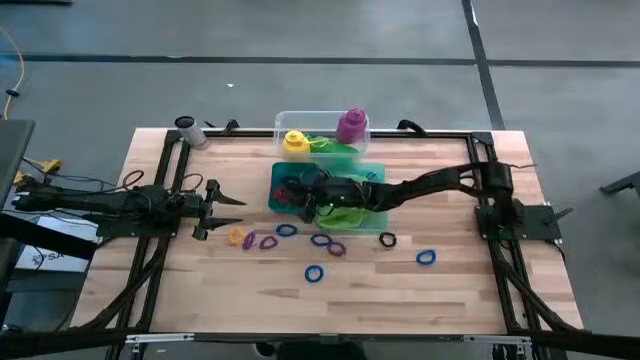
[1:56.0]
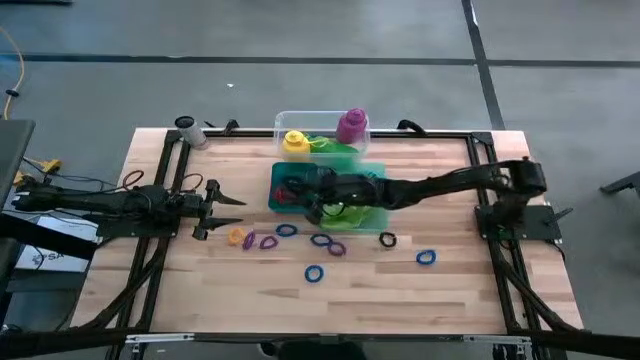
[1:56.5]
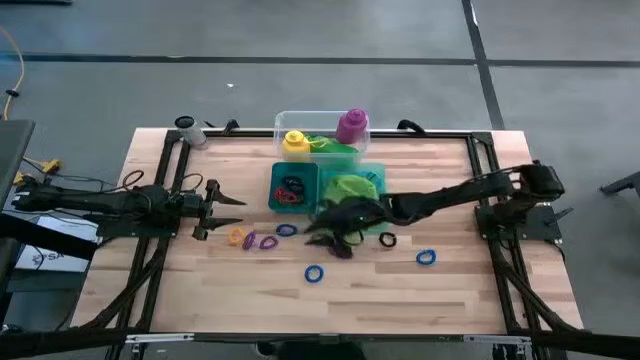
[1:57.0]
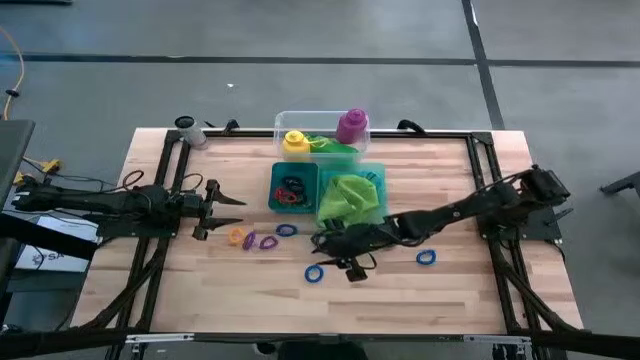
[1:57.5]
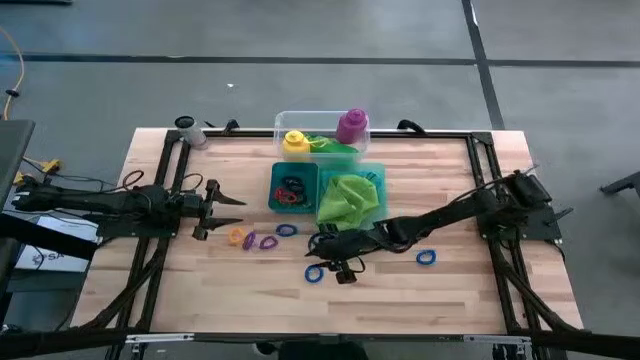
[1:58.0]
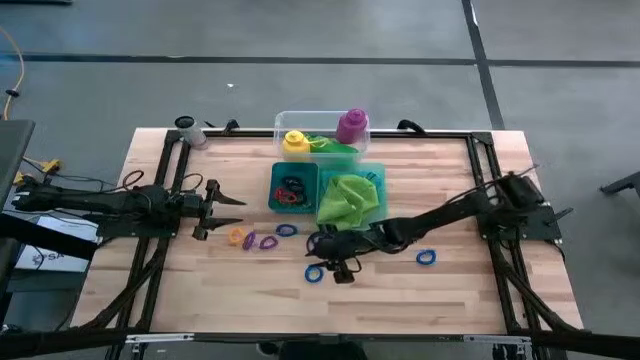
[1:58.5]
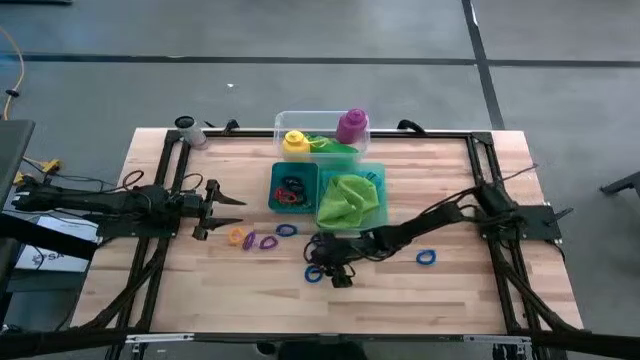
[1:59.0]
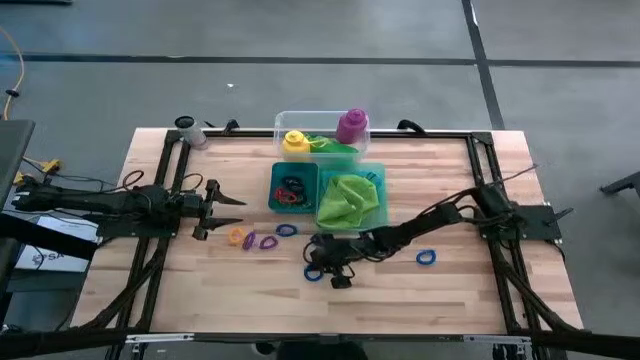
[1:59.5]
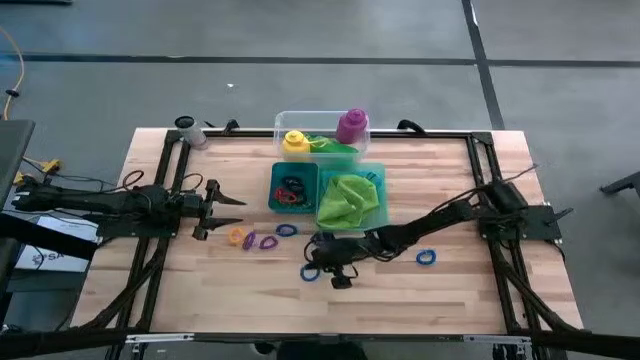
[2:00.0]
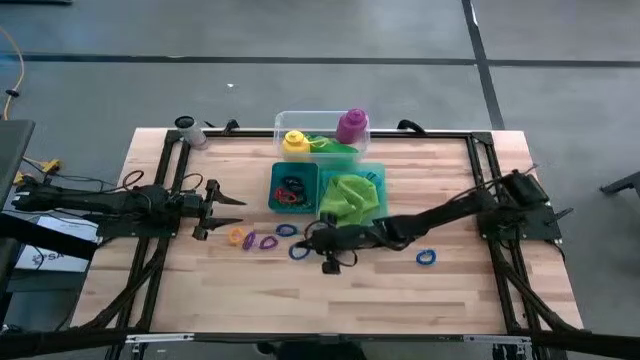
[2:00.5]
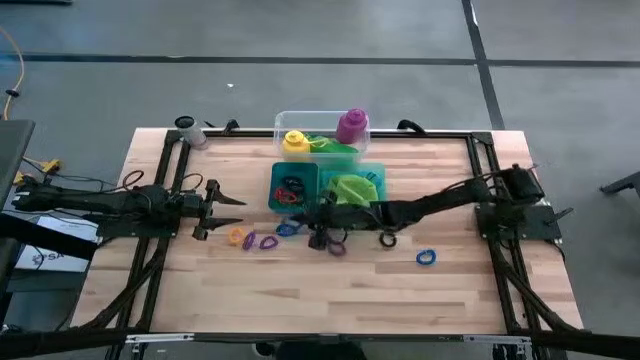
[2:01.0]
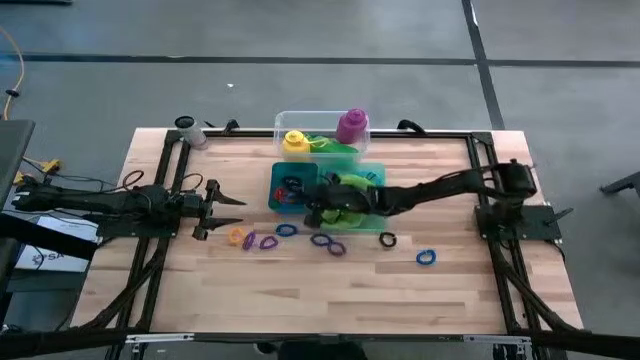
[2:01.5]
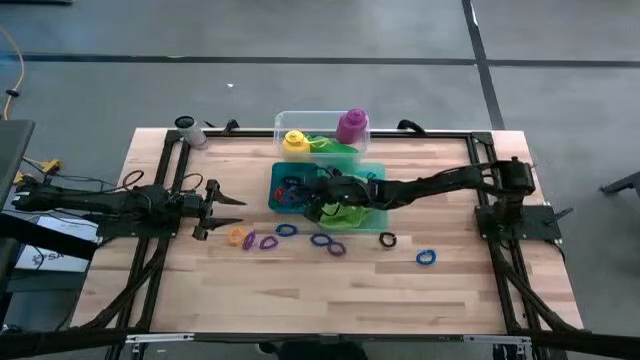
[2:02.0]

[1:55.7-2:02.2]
Task: Pick & Place Sports Items
Put the blue spring keychain into the blue bin

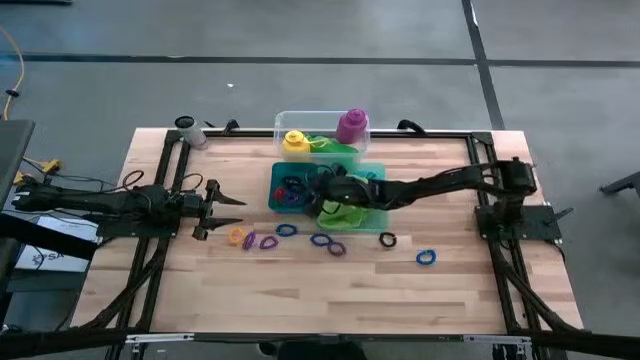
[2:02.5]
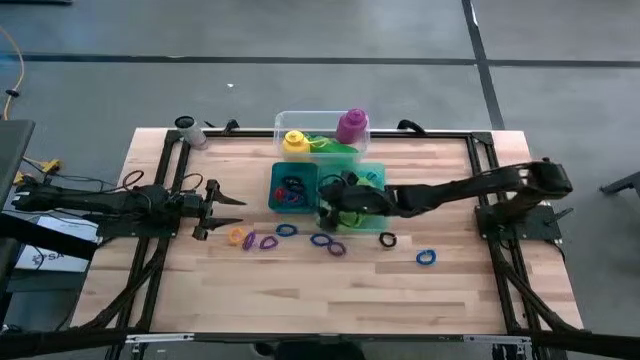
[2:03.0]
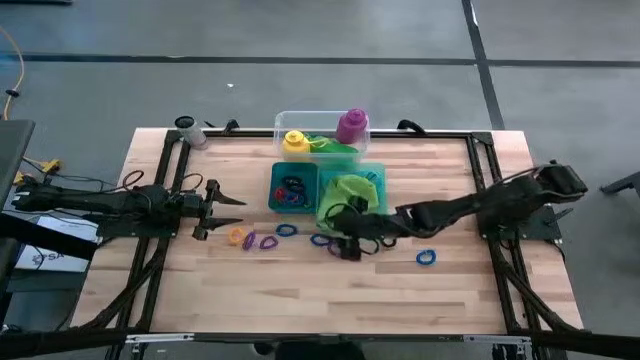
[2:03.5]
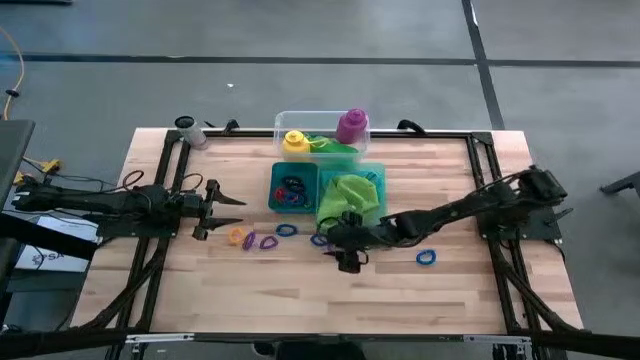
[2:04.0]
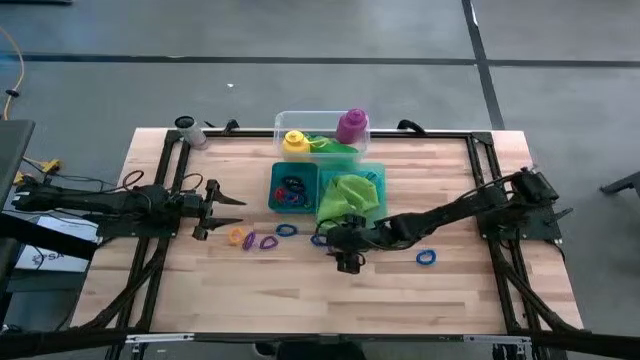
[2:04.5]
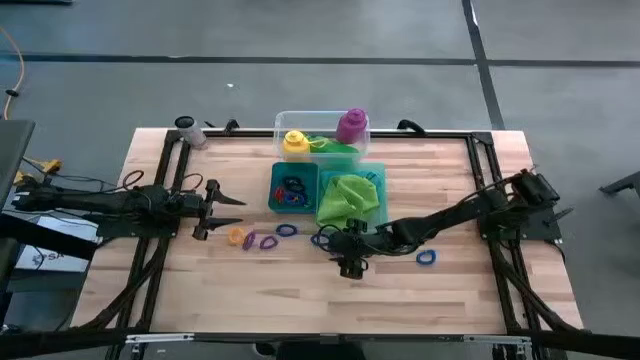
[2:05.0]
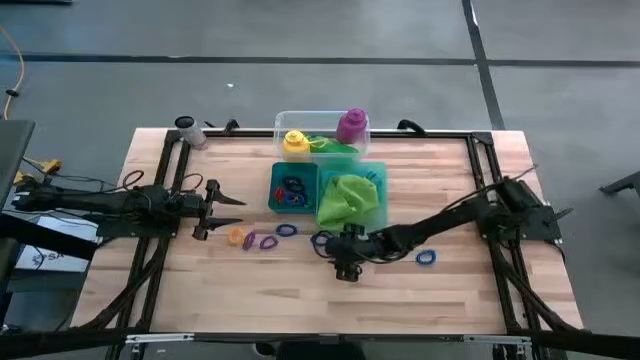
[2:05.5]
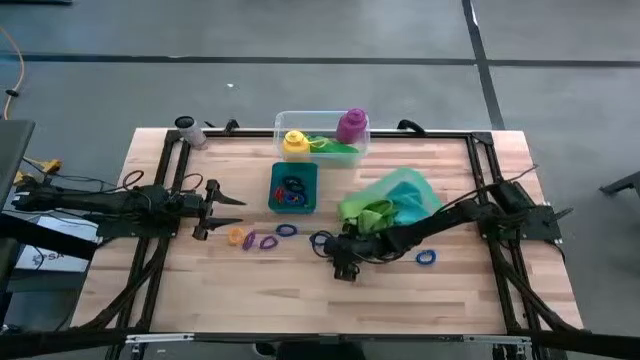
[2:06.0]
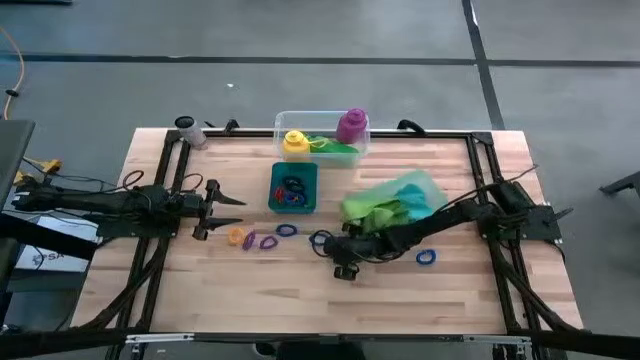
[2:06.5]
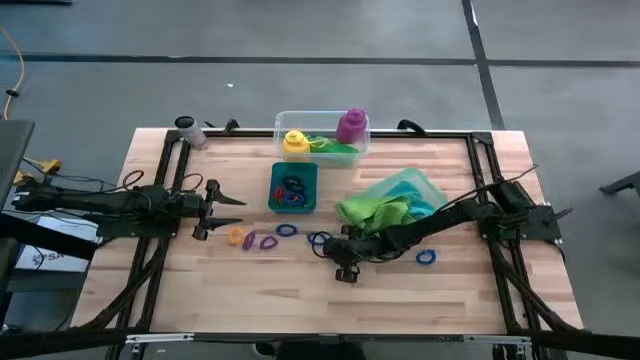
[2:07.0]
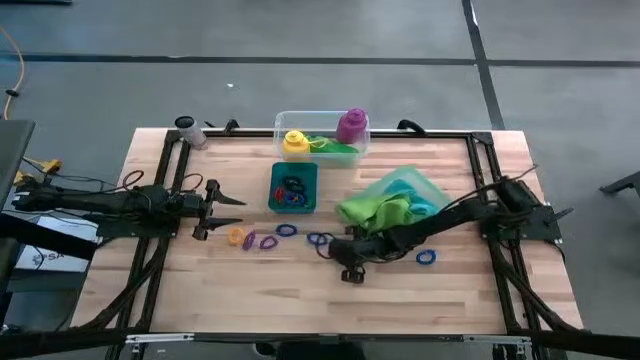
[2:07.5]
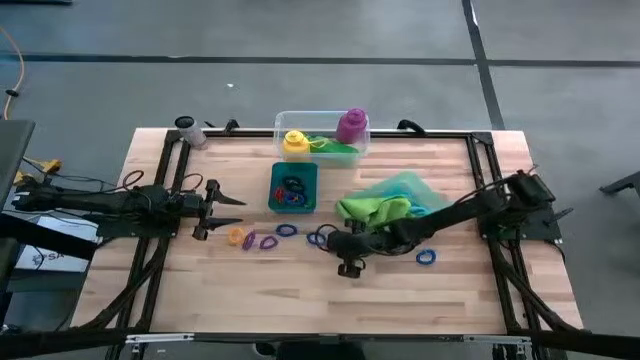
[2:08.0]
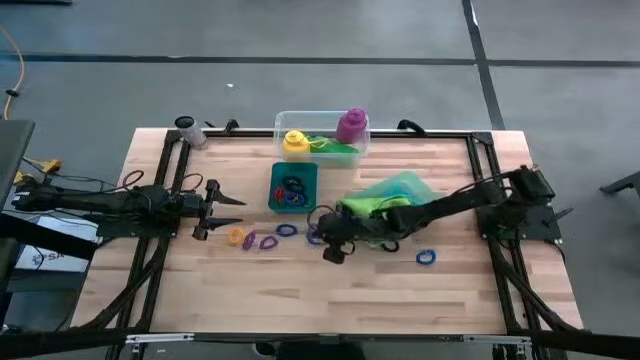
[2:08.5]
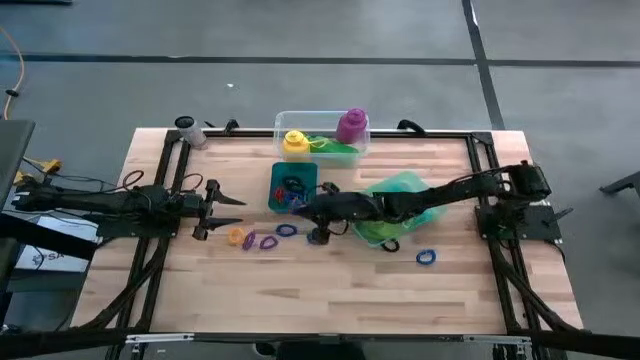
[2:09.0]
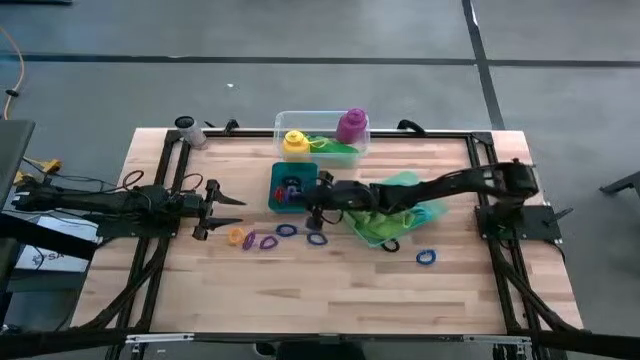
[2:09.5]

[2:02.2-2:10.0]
Put the right purple spring keychain into the blue bin

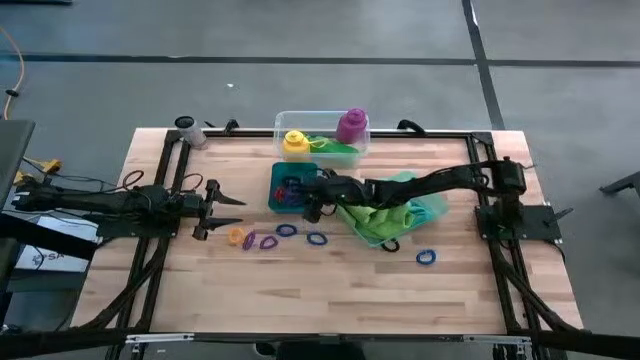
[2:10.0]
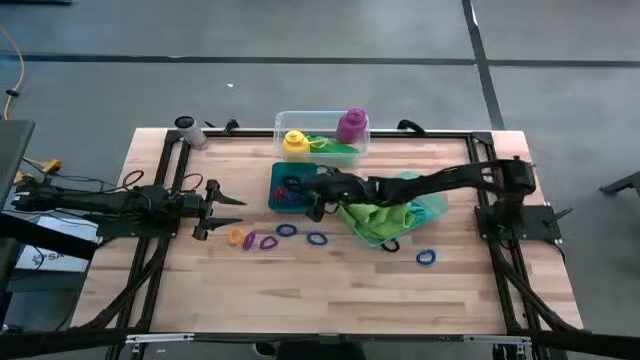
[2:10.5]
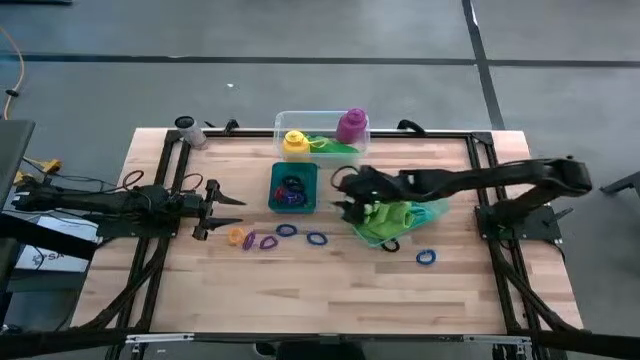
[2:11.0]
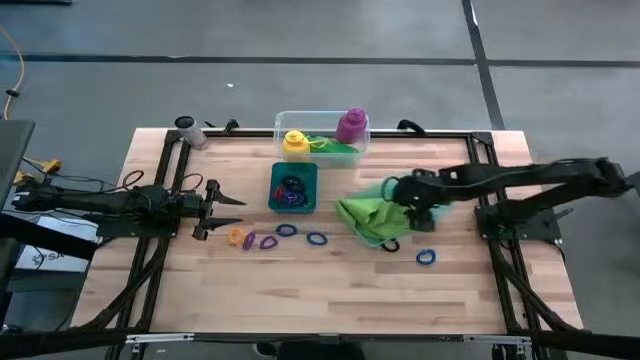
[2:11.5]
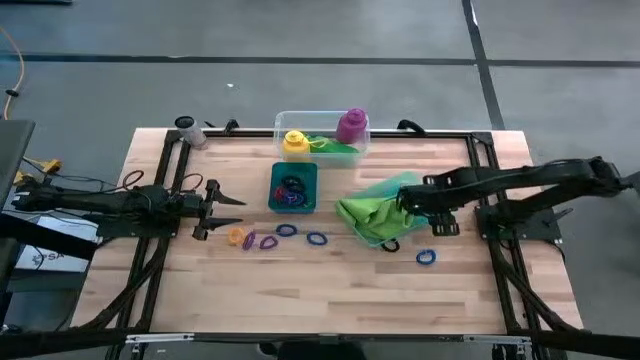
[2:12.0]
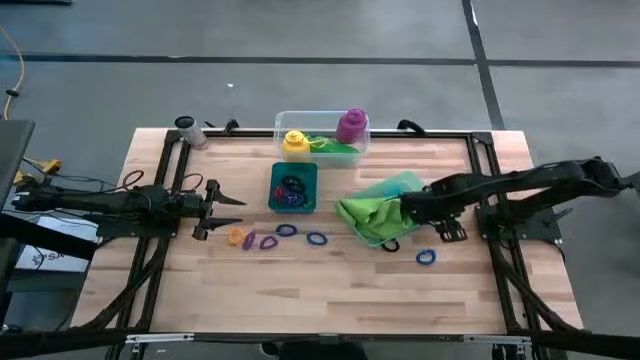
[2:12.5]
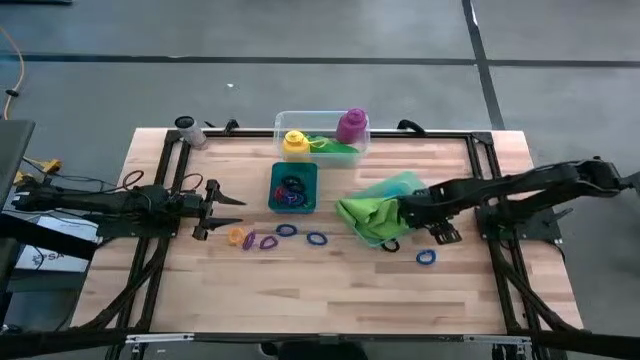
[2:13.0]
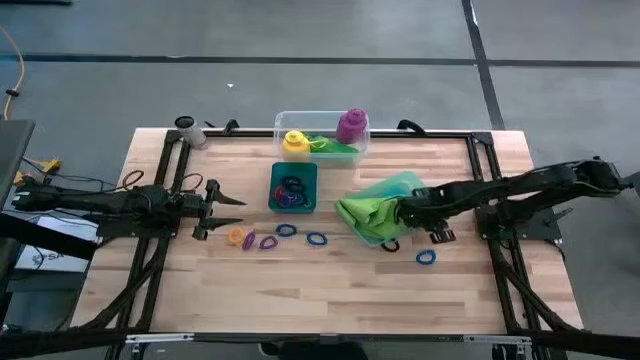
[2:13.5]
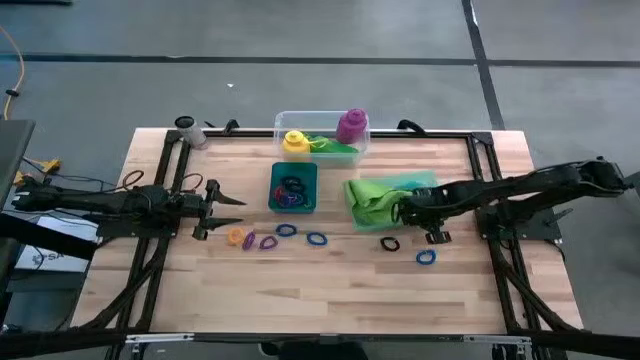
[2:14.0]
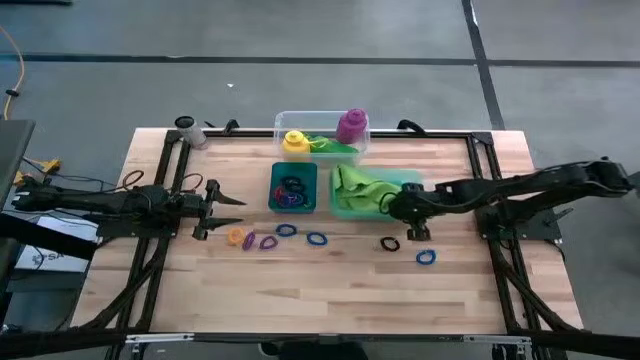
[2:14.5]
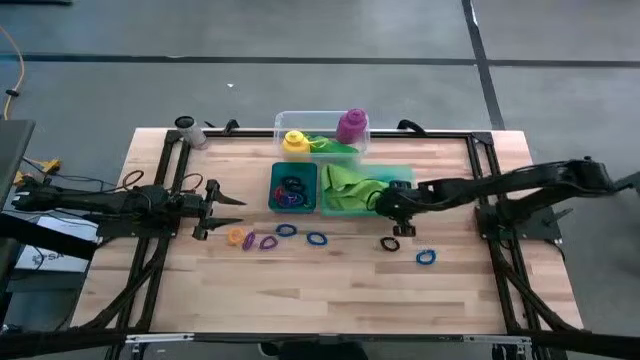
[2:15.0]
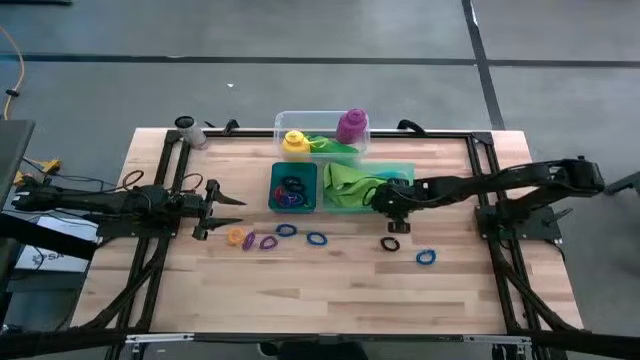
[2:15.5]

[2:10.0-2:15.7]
Adjust the green bin on the table
